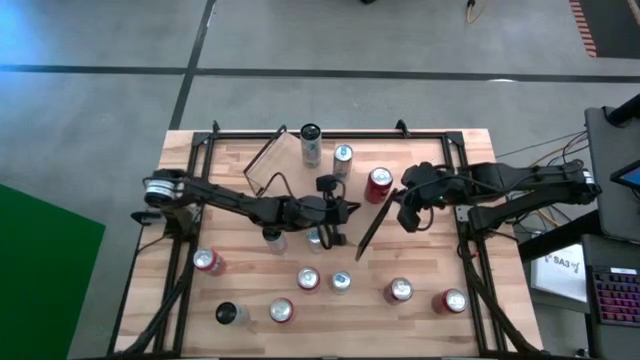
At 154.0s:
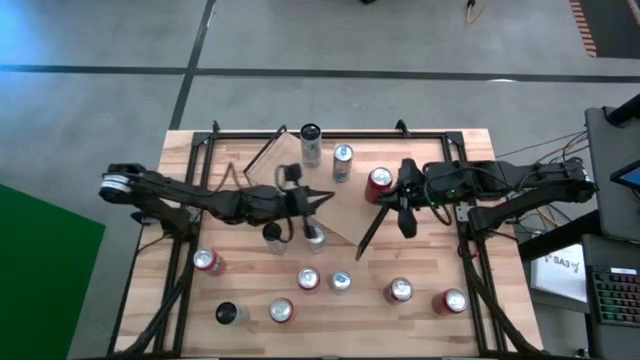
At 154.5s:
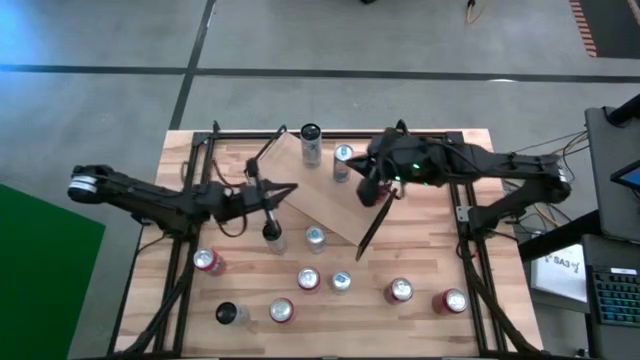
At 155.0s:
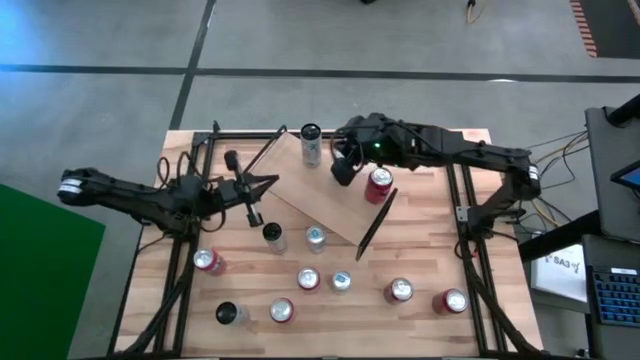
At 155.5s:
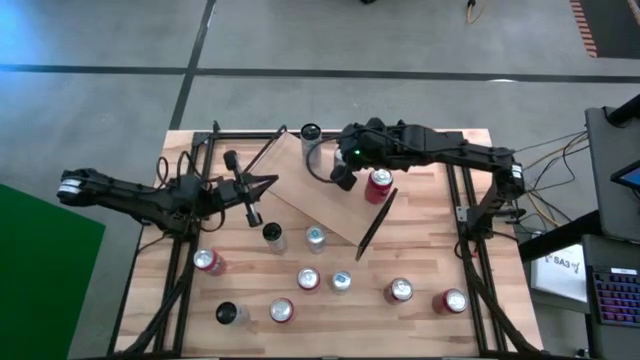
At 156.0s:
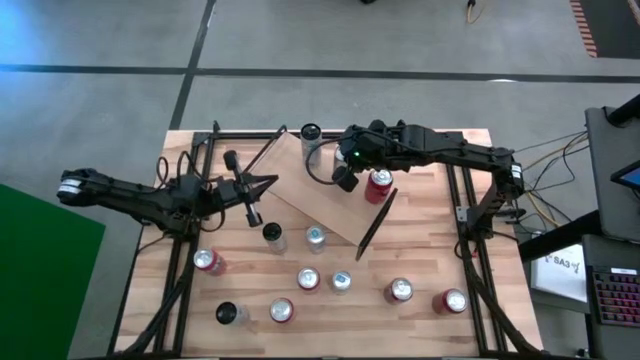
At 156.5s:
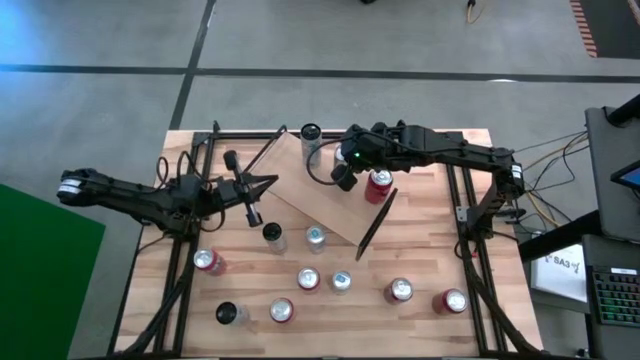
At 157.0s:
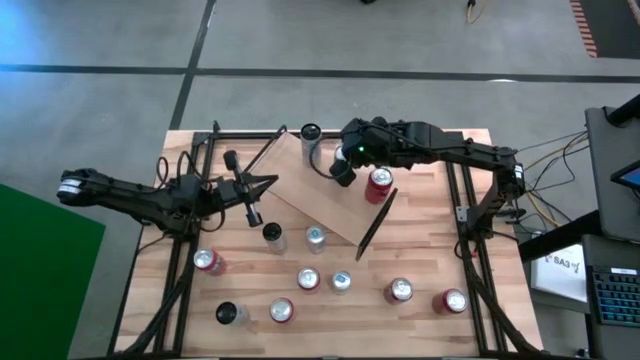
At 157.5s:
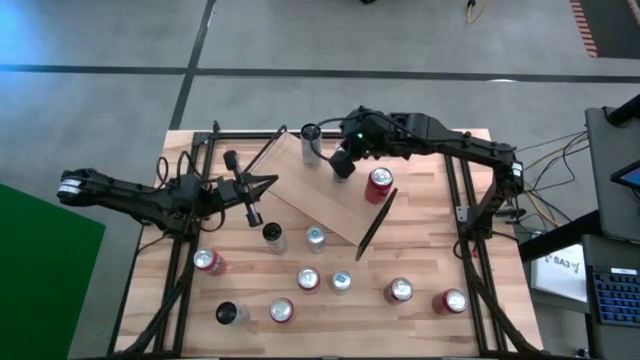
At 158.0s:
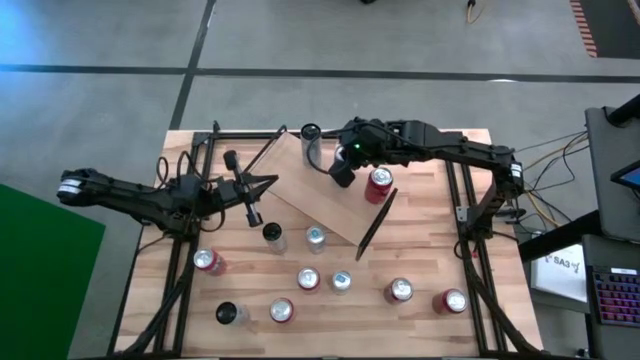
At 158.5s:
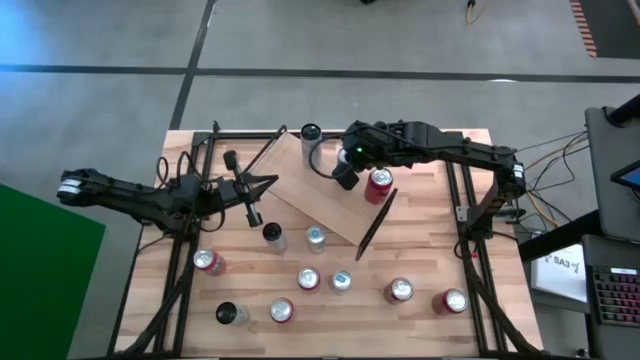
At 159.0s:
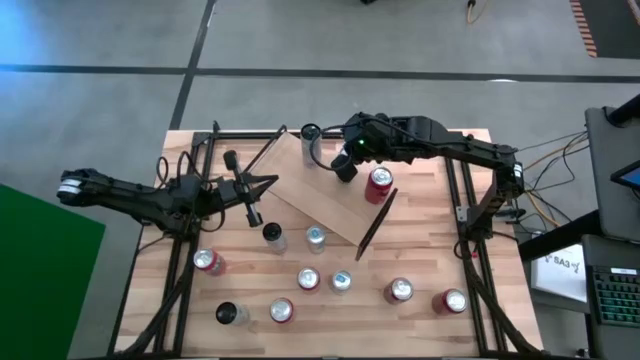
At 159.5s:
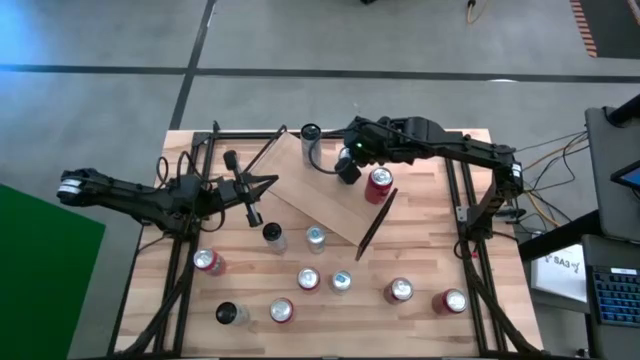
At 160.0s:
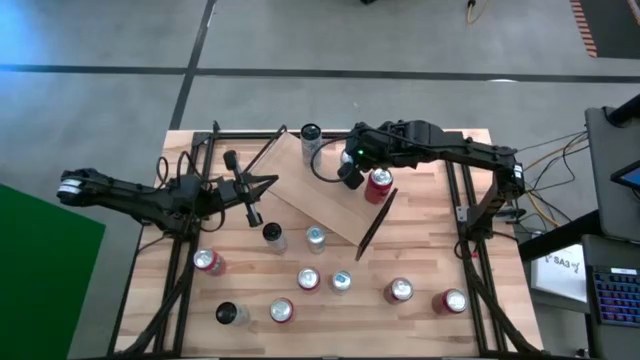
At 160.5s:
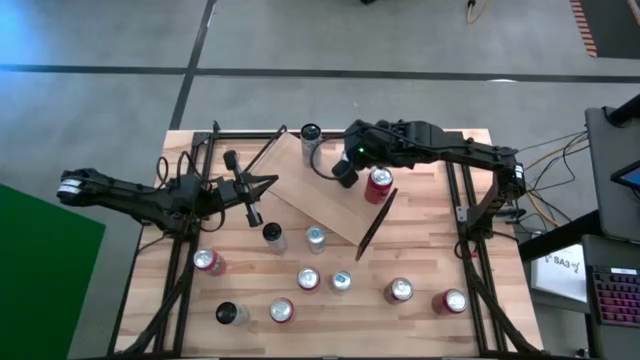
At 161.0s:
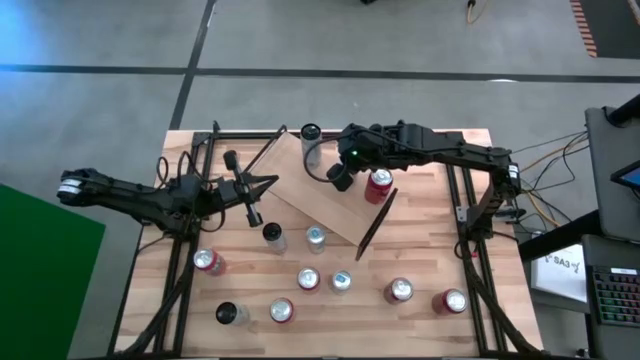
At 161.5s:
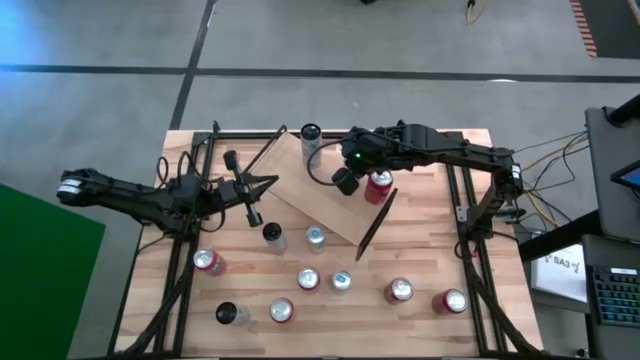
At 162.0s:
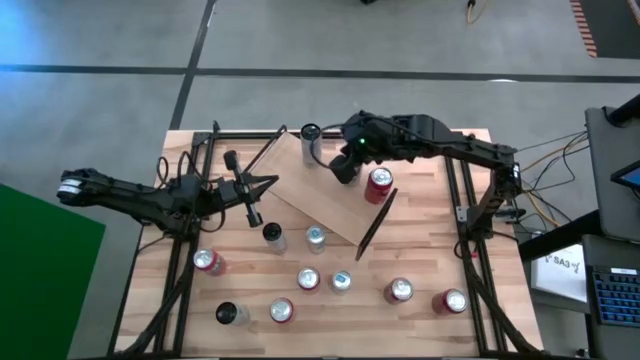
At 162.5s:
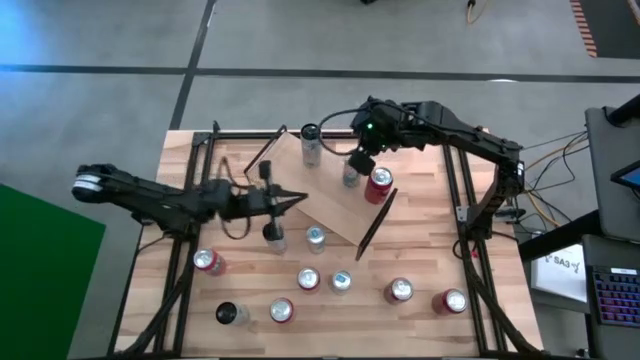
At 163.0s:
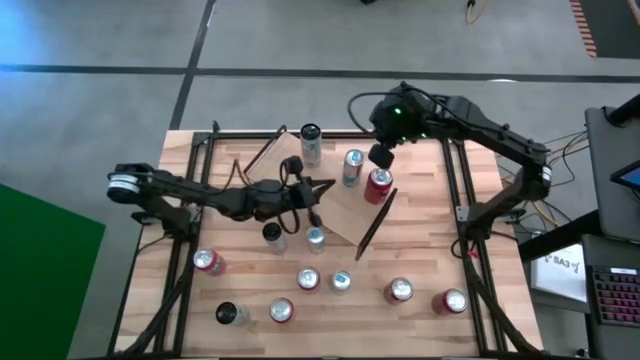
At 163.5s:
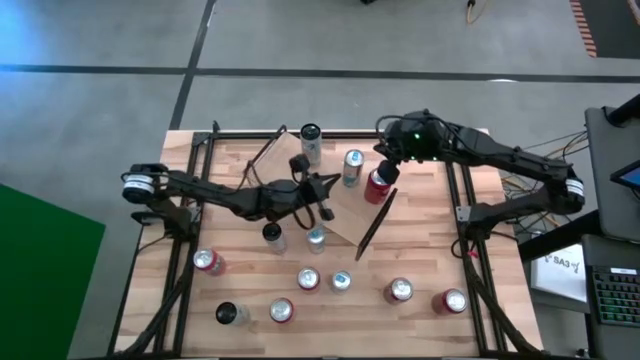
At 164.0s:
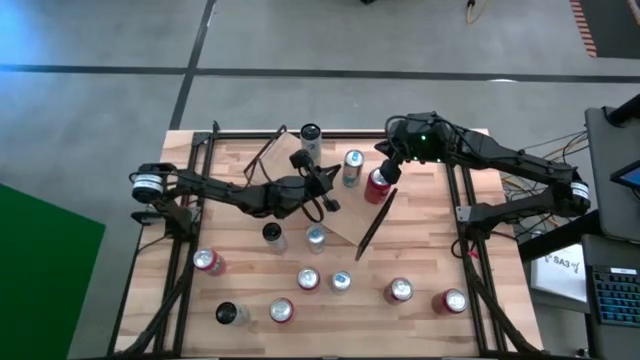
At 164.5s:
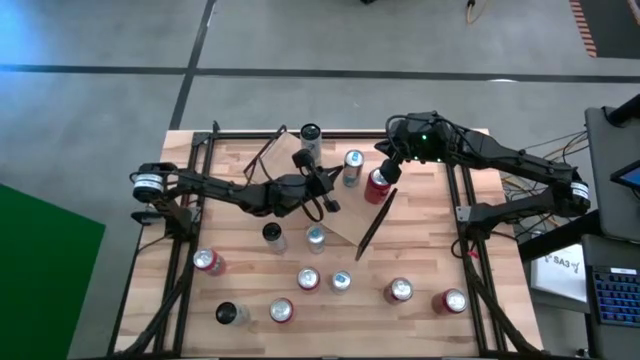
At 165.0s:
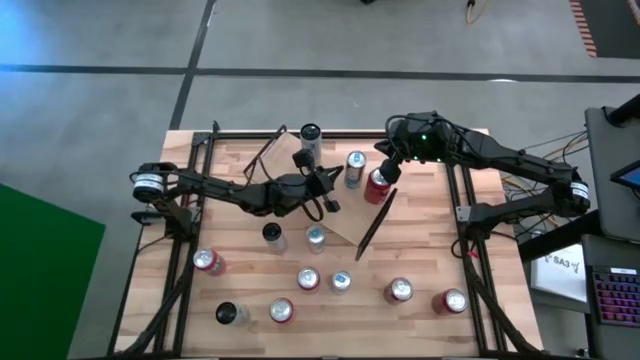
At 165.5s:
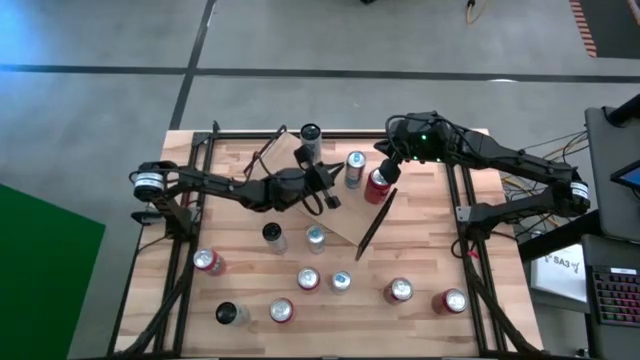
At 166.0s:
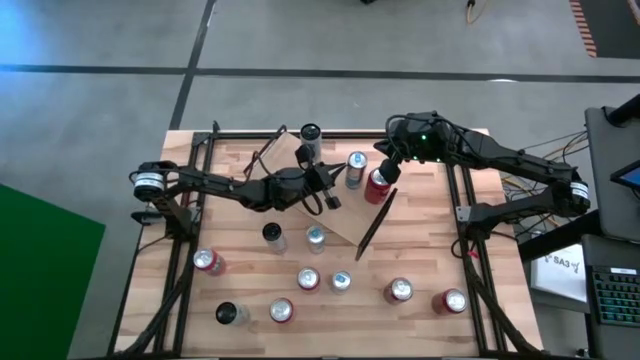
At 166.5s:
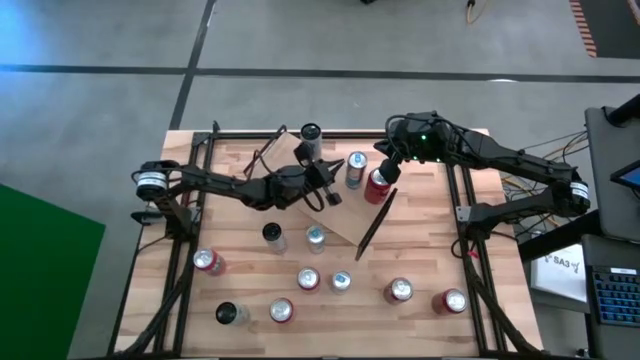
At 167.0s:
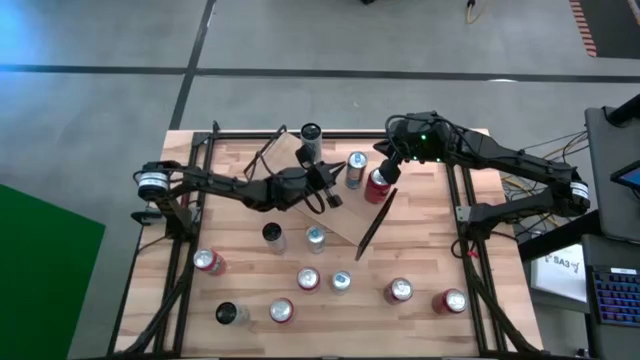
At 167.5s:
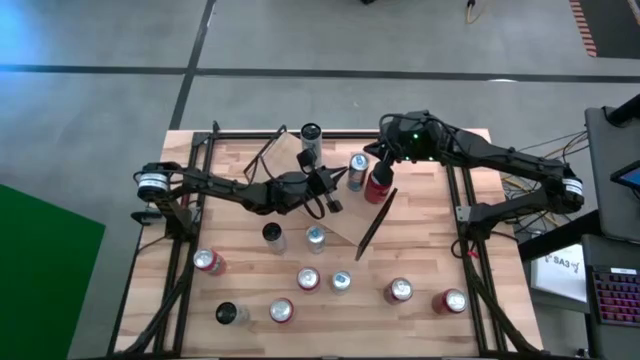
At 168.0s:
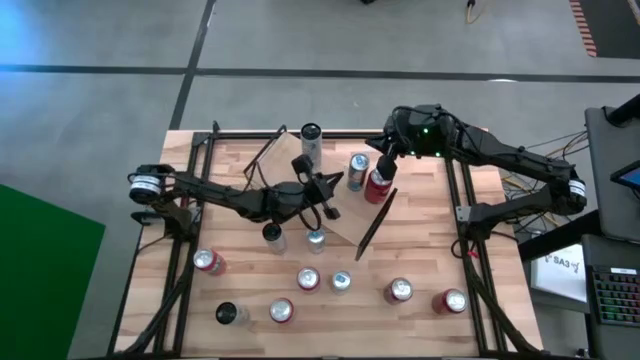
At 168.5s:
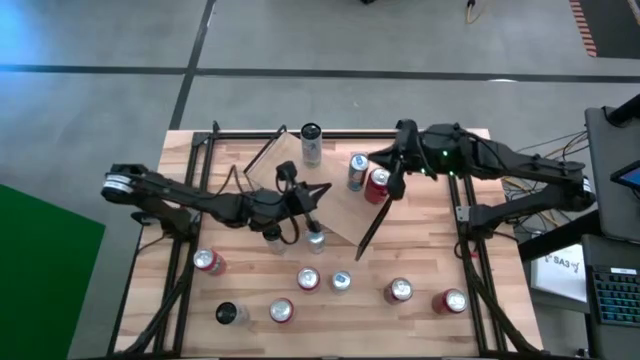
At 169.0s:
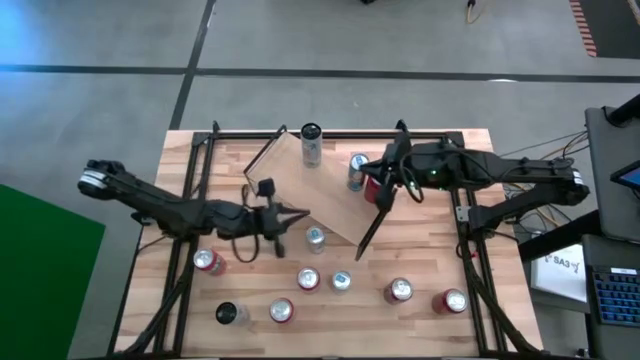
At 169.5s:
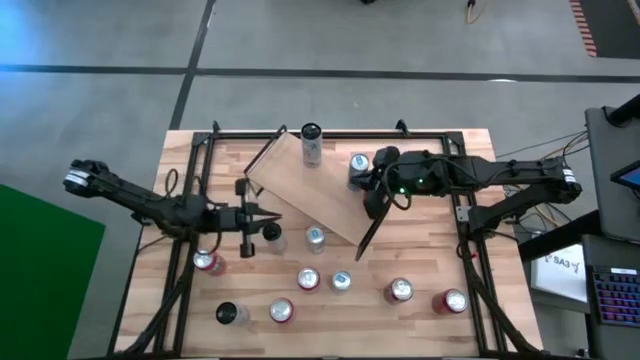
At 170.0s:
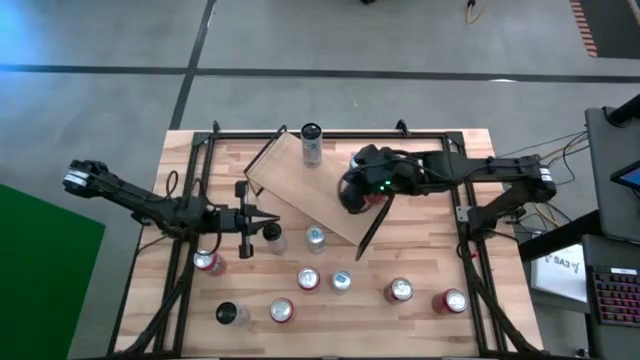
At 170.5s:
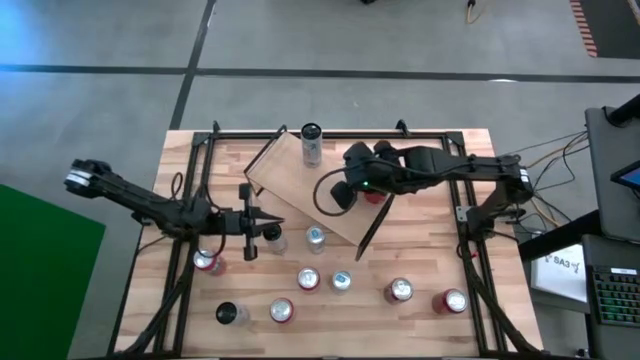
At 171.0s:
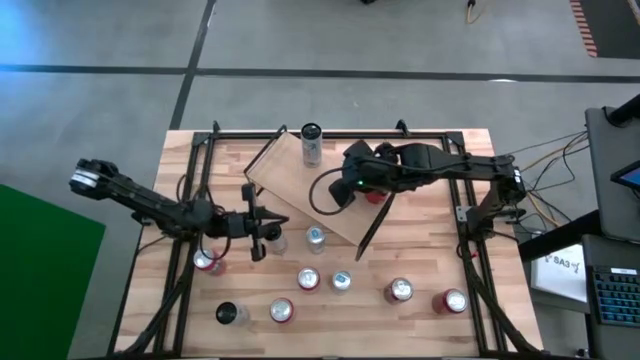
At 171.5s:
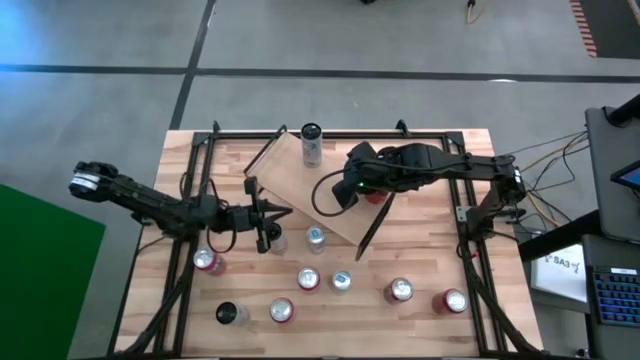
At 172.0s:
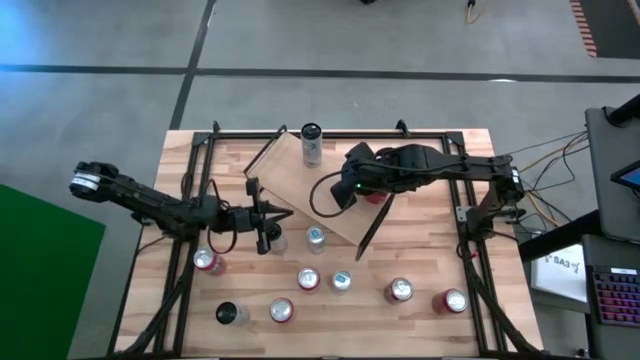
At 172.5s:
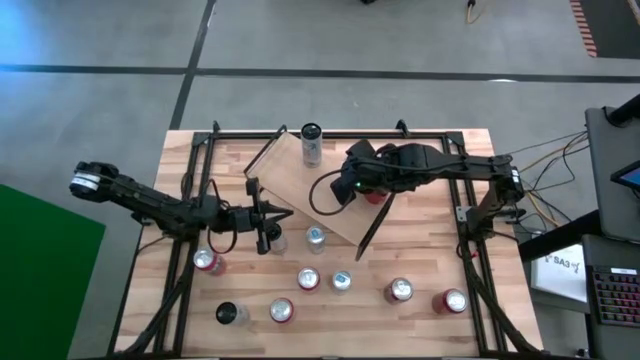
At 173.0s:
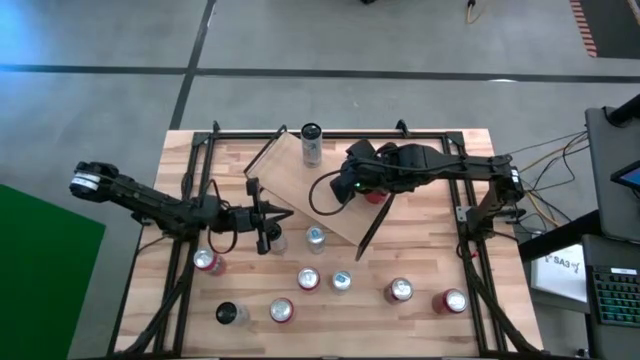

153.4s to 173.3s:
Task: Place canned beverage on shelf
Adjust the silver/blue soda can on the shelf

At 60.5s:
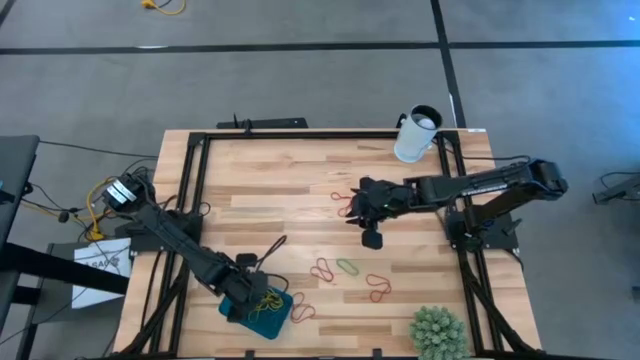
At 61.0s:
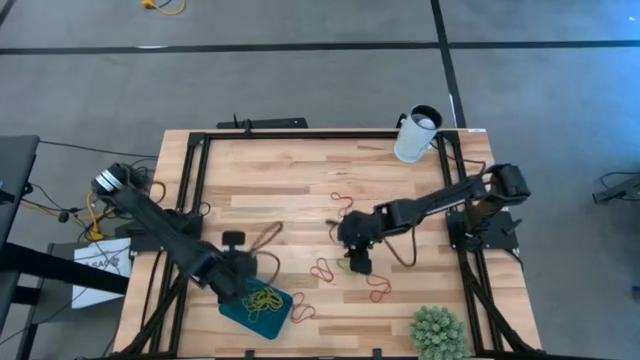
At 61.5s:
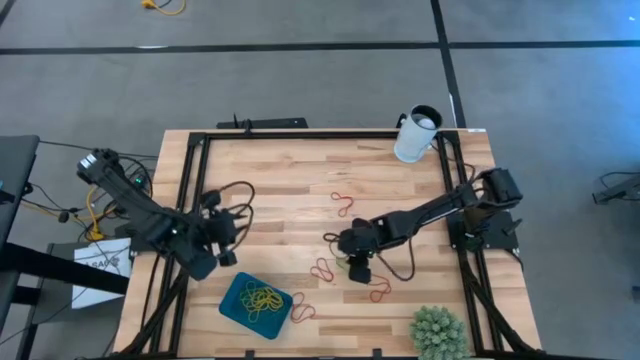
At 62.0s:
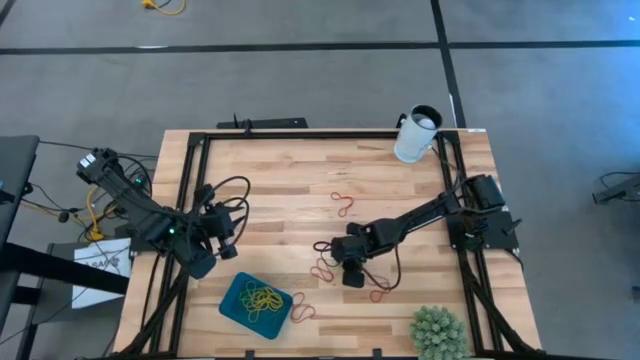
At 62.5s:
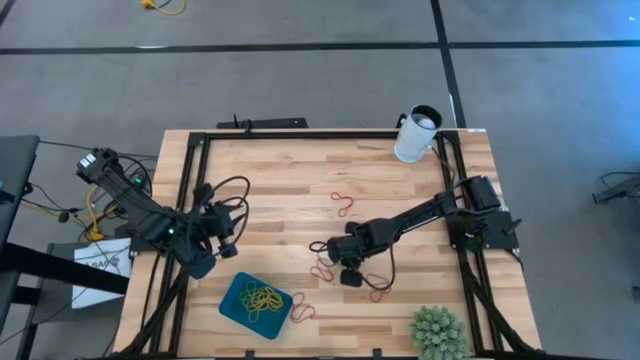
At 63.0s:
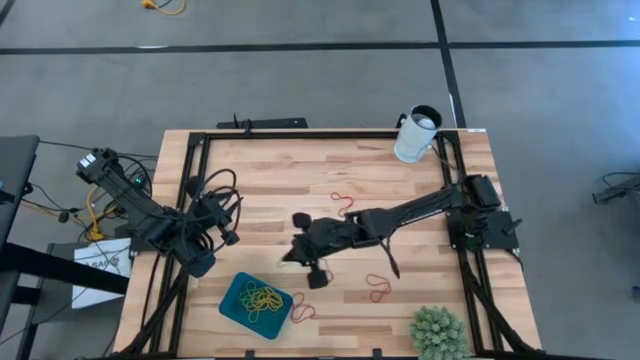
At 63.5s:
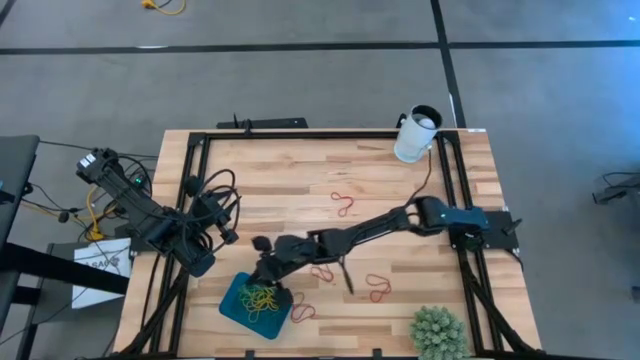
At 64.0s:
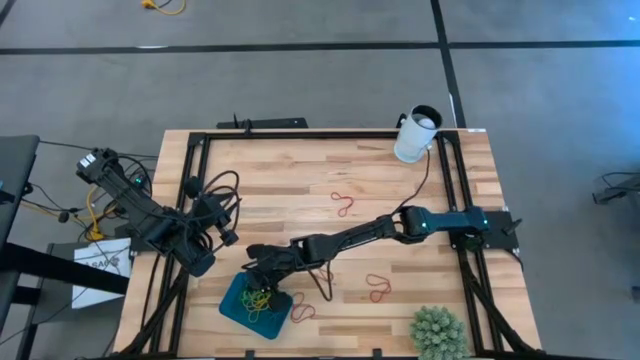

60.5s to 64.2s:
Task: Pick and place items into bin
Put the green rubber band into the blue bin
